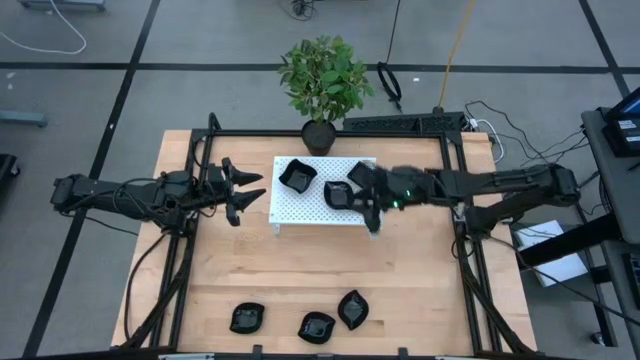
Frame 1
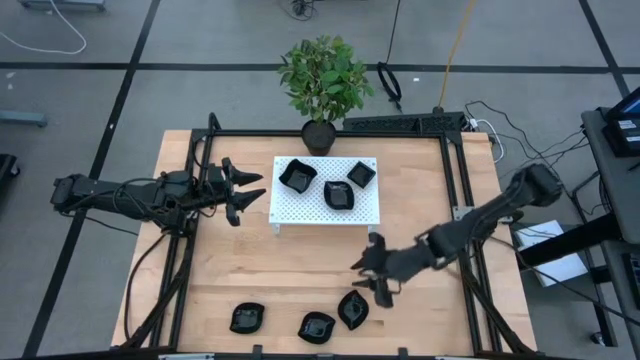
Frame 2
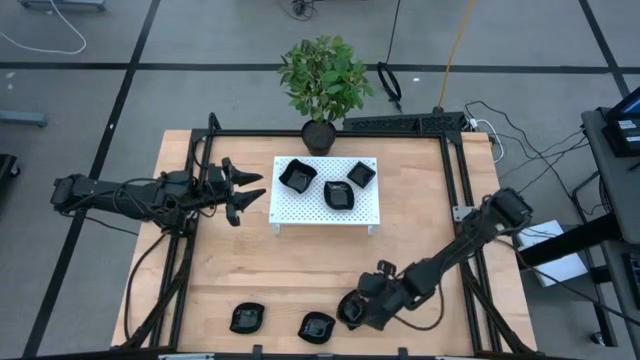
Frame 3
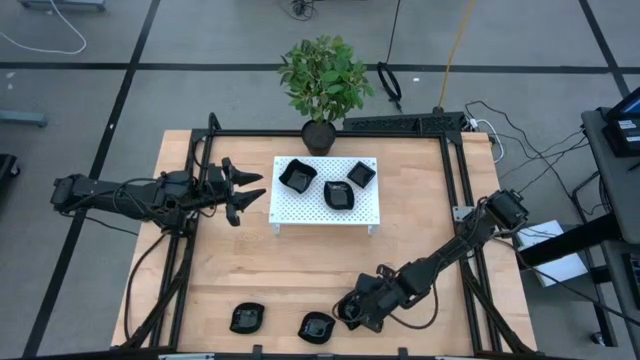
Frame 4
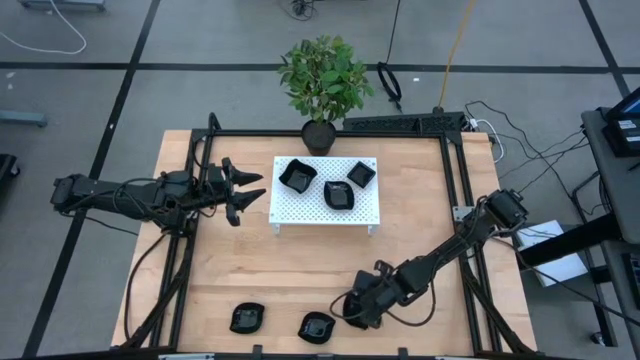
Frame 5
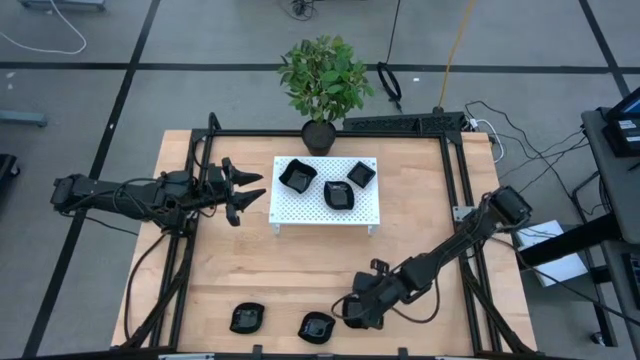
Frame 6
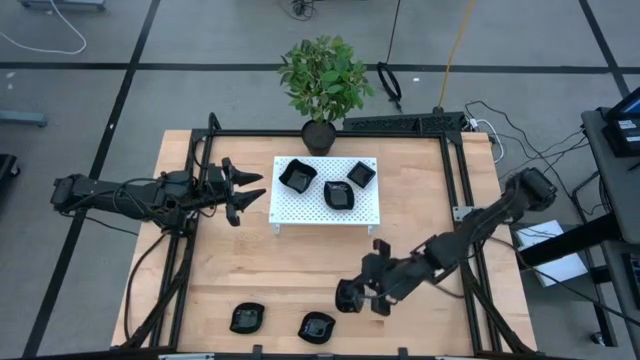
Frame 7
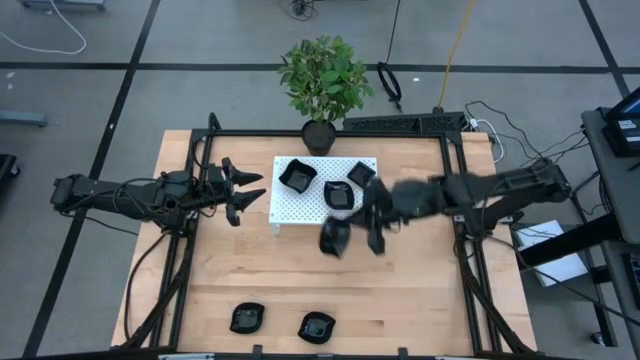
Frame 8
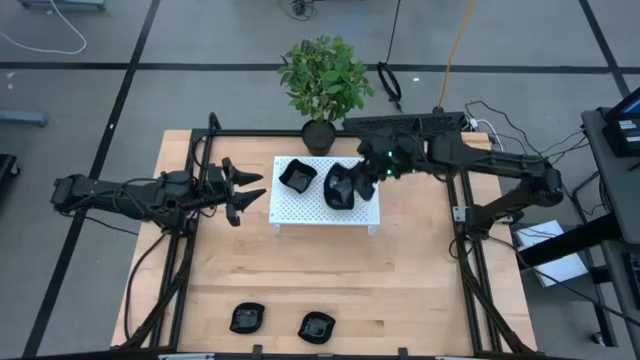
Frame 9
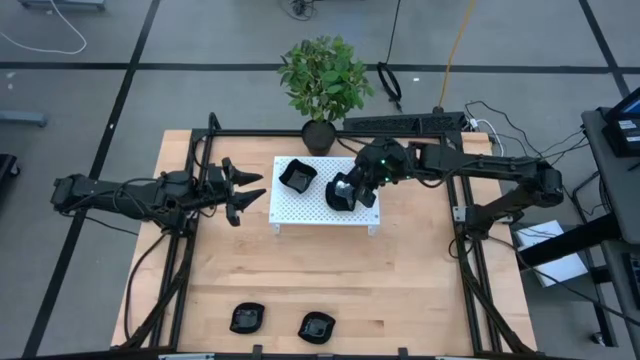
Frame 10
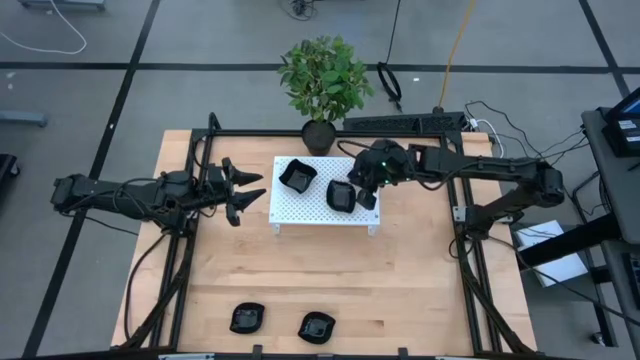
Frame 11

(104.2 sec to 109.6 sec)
Task: Pick & Place Mini shaped plates
Stack the black leaf-shaped plate on top of the black leaf-shaped plate on the shelf

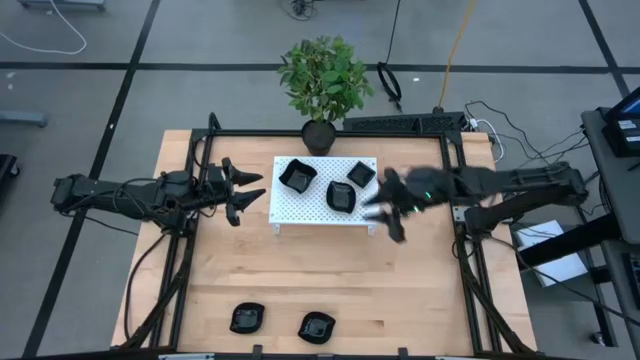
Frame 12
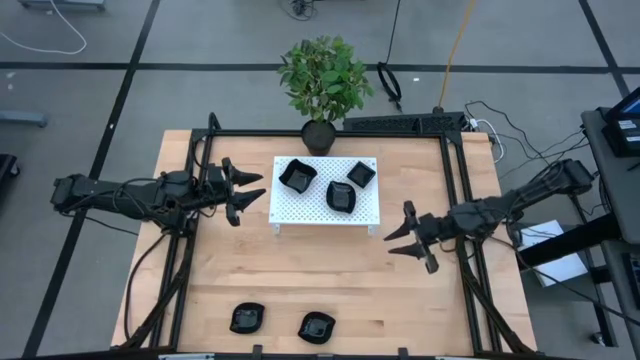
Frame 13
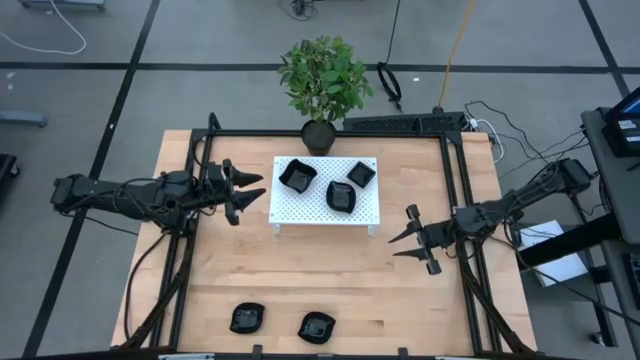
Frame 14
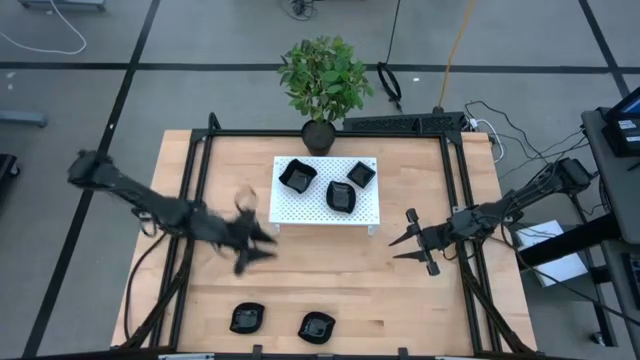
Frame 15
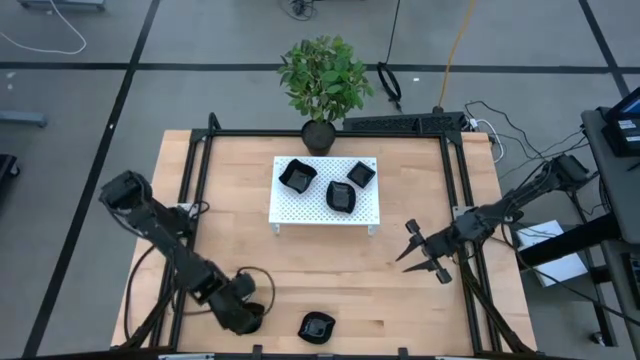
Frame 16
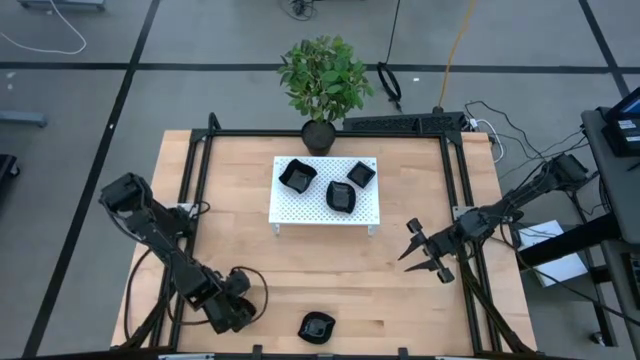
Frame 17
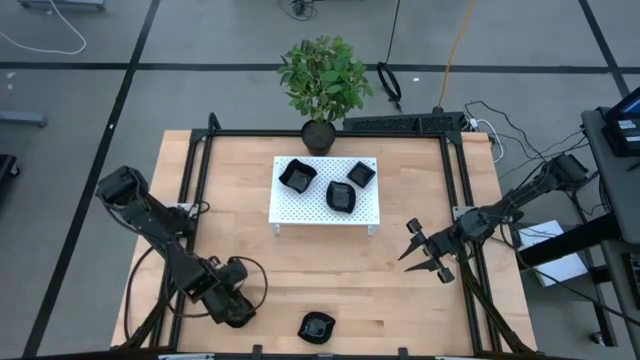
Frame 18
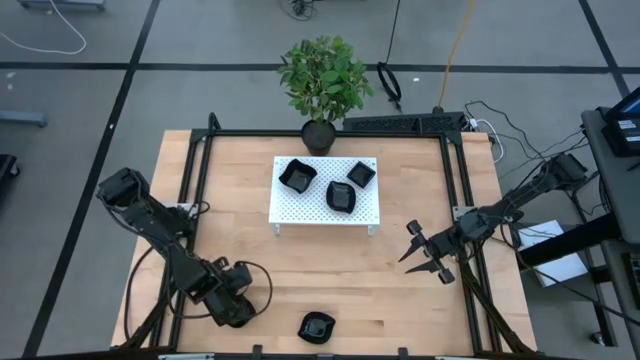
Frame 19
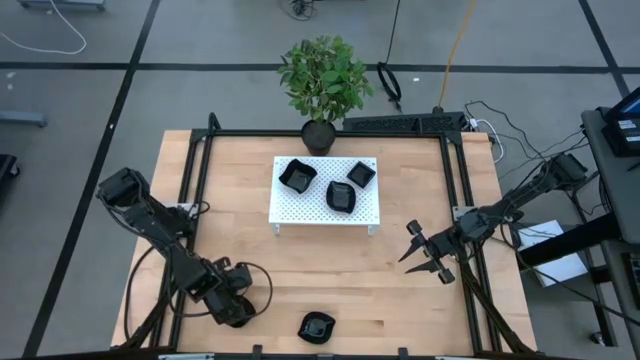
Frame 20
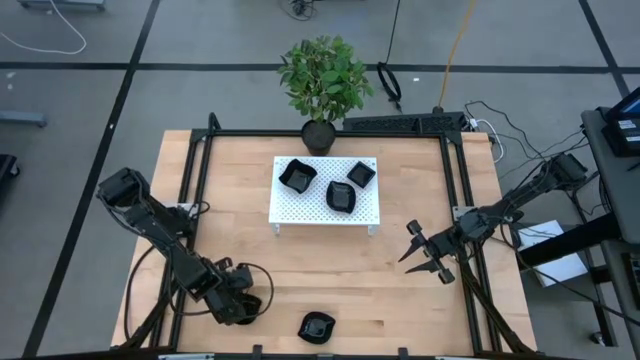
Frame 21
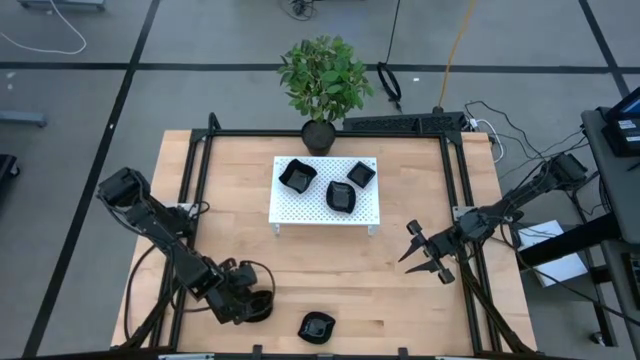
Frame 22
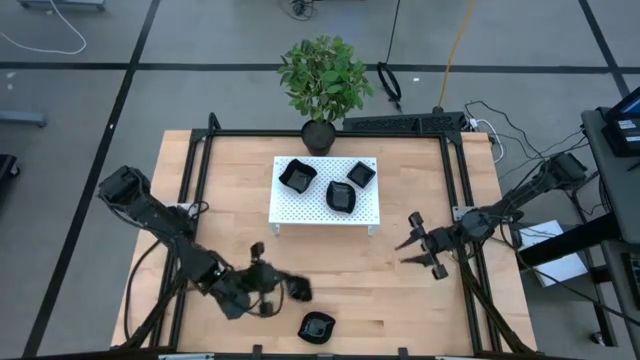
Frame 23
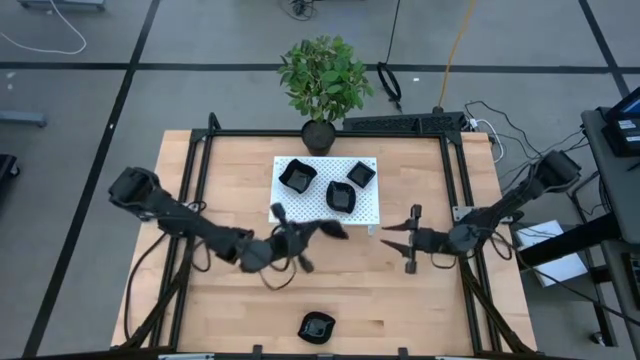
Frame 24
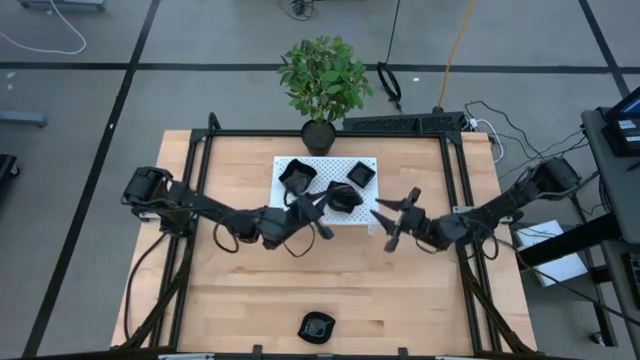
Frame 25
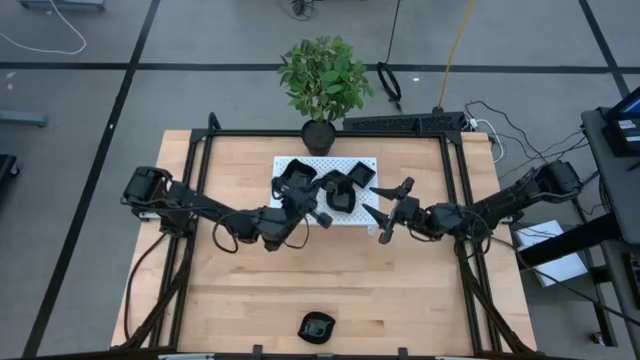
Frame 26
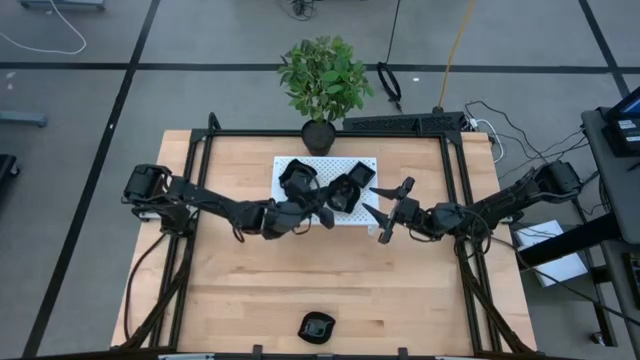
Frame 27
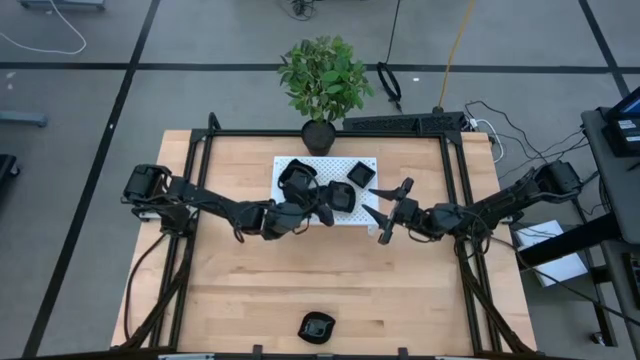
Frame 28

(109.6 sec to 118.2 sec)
Stack the black leaf-shaped plate on top of the black leaf-shaped plate on the shelf

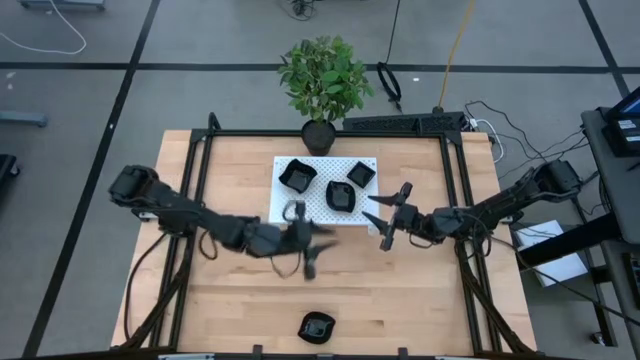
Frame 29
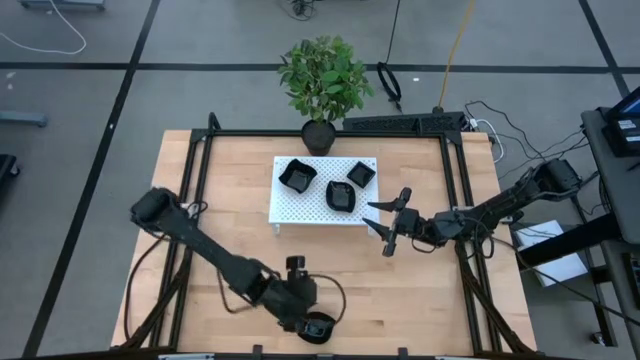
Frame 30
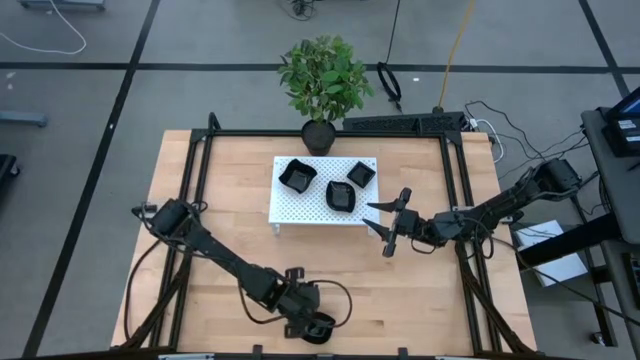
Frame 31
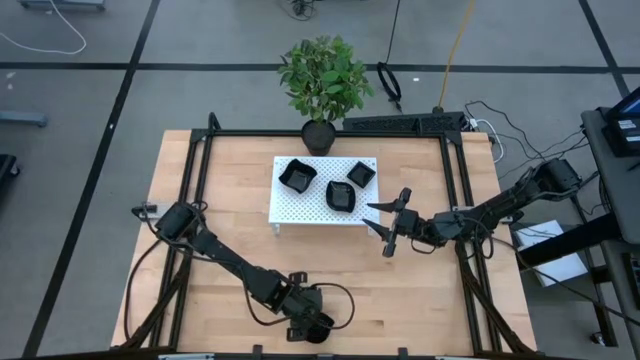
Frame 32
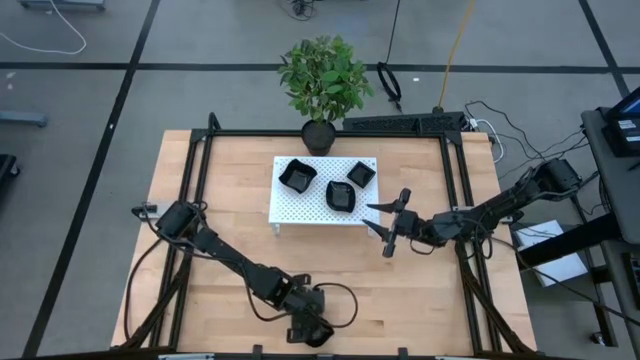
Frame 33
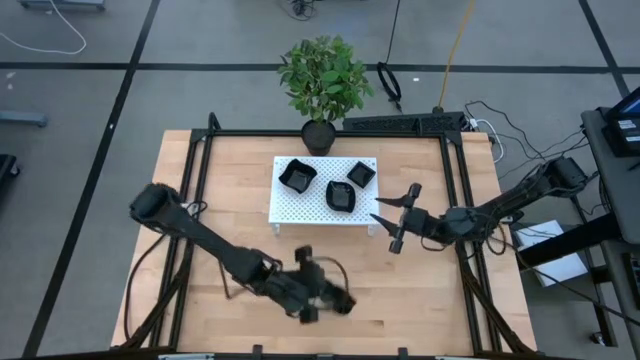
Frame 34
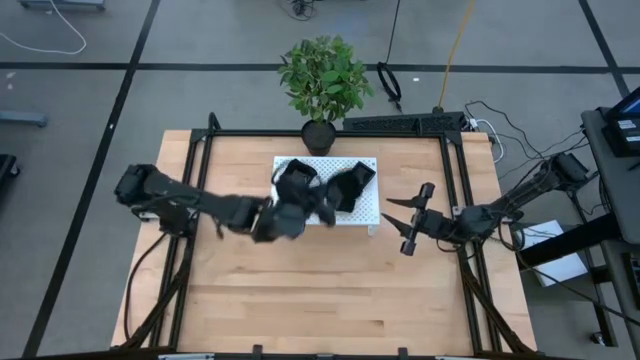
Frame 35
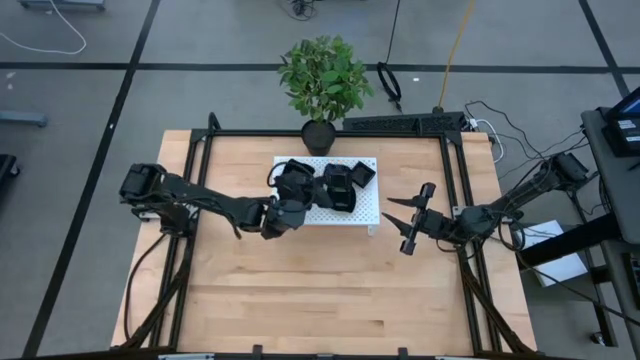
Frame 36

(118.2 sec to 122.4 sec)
Stack the black leaf-shaped plate on top of the black leaf-shaped plate on the shelf

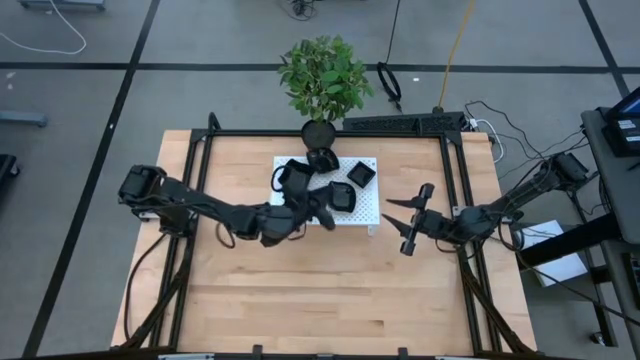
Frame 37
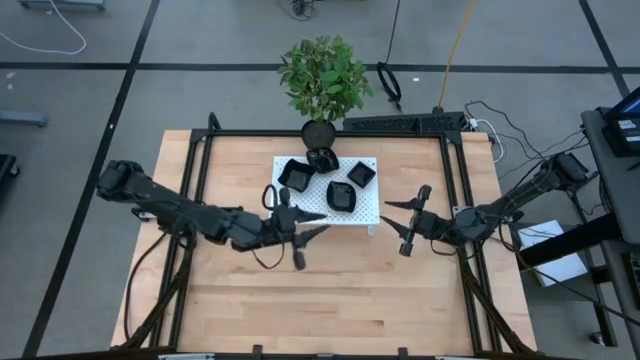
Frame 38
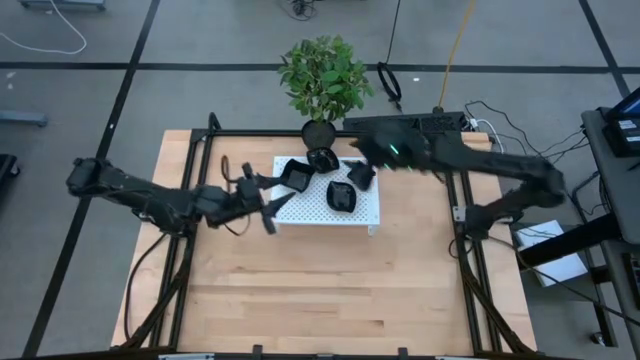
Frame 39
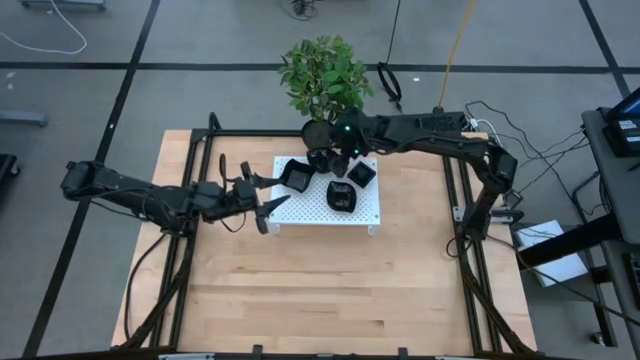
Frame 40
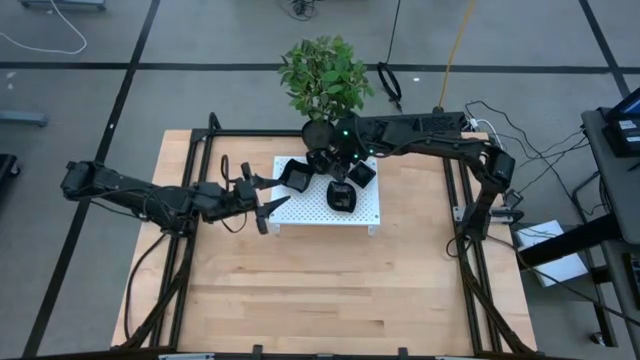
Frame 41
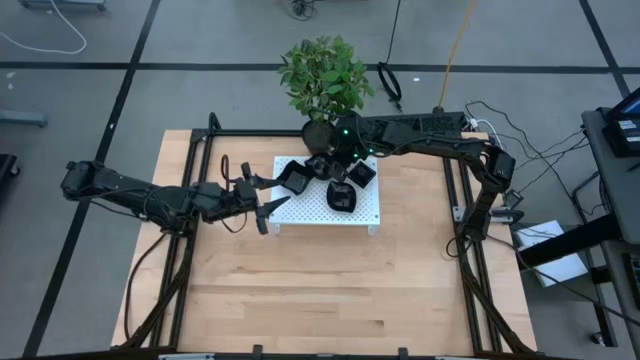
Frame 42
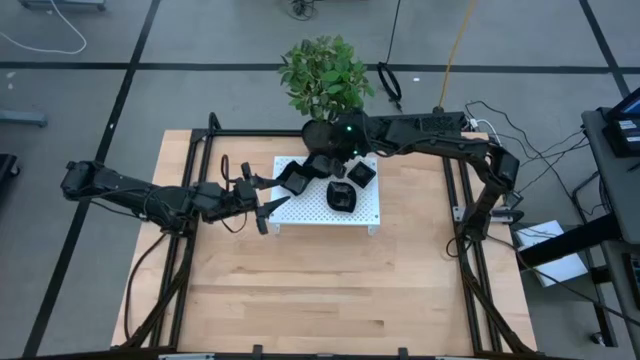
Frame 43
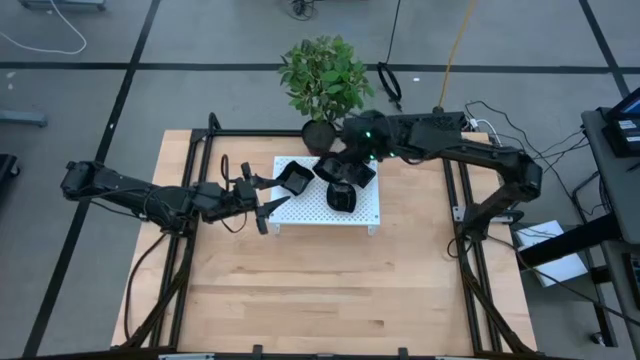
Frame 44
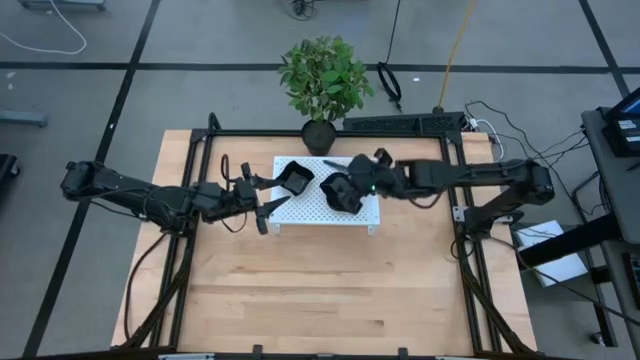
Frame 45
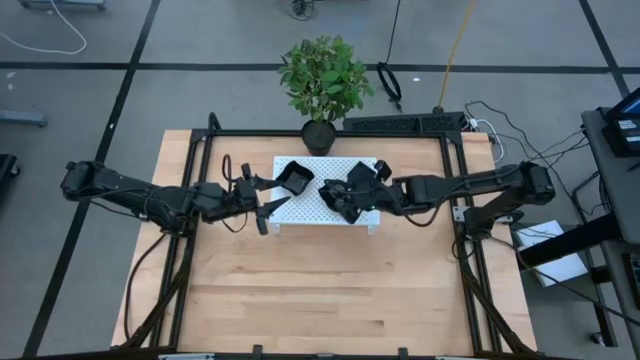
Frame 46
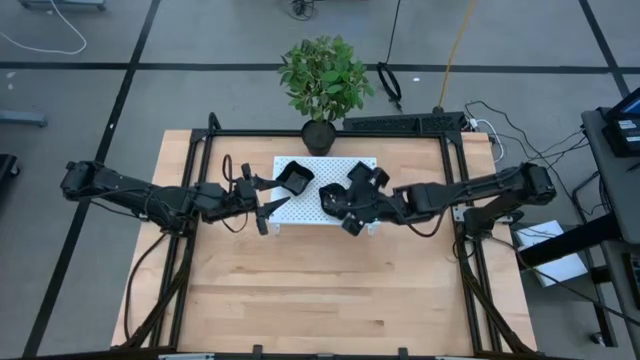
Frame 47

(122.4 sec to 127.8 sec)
Stack the black leaf-shaped plate on top of the black leaf-shaped plate on the shelf
